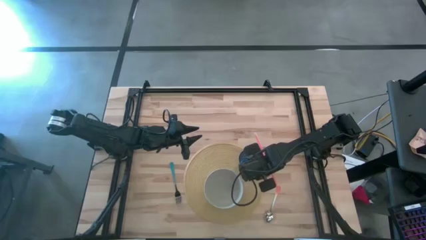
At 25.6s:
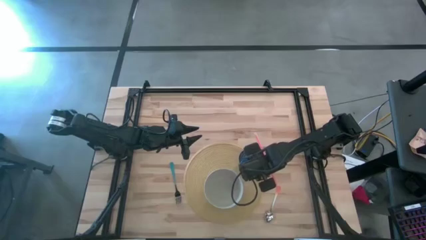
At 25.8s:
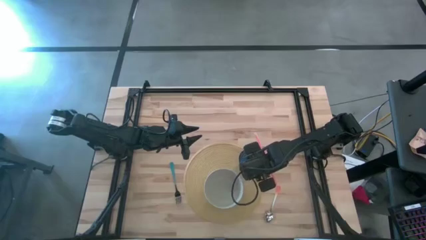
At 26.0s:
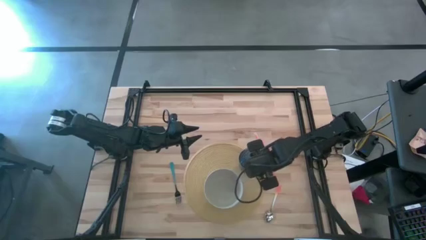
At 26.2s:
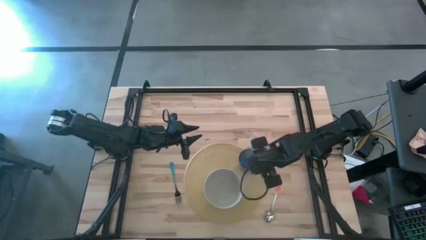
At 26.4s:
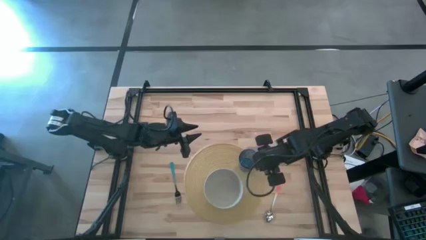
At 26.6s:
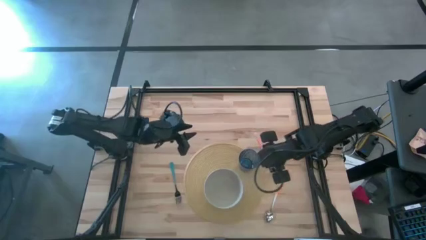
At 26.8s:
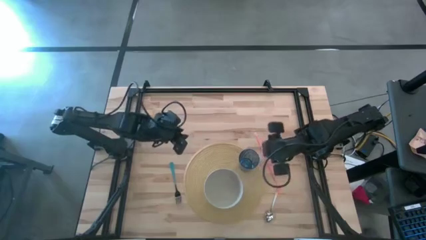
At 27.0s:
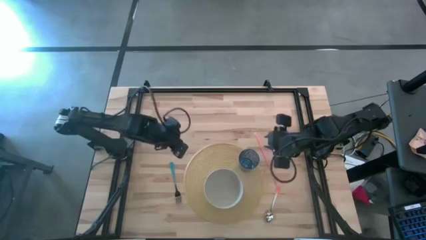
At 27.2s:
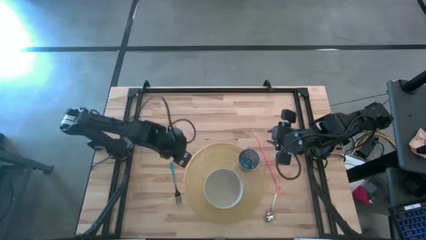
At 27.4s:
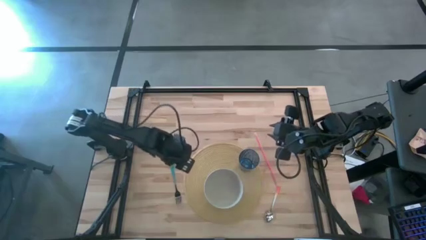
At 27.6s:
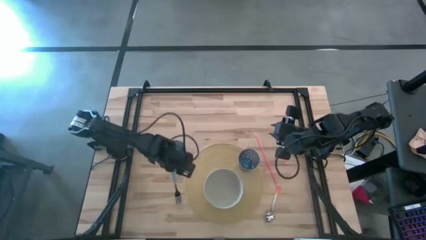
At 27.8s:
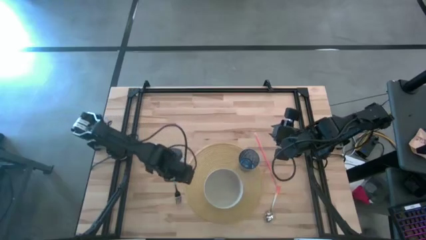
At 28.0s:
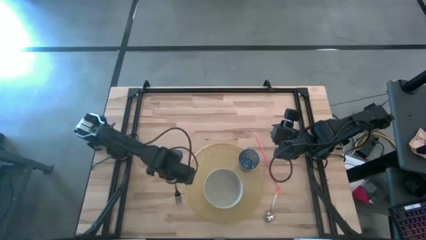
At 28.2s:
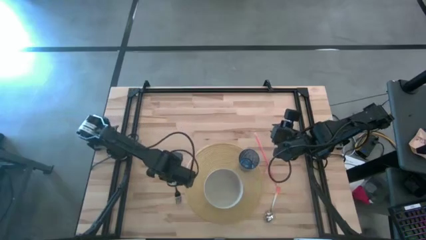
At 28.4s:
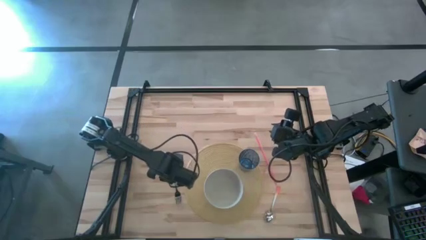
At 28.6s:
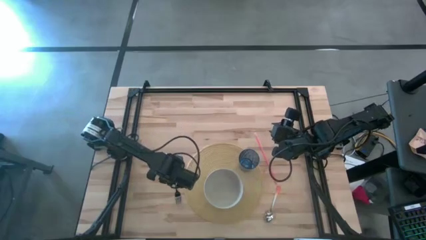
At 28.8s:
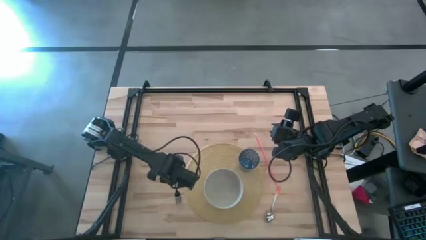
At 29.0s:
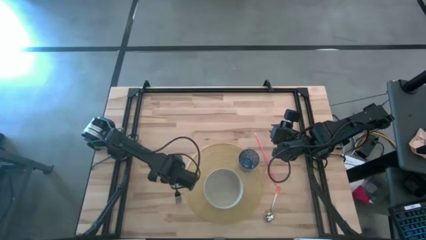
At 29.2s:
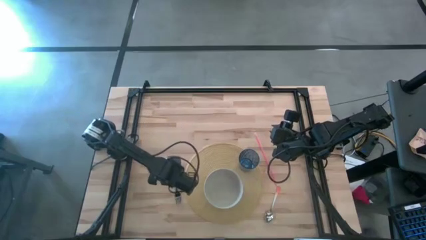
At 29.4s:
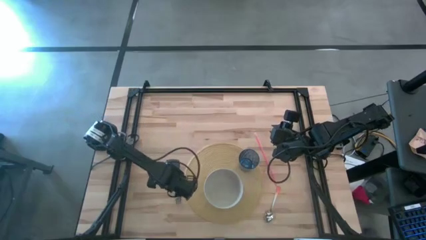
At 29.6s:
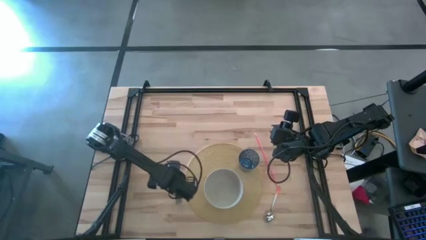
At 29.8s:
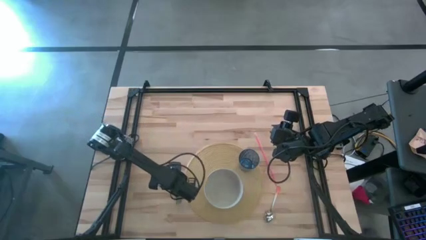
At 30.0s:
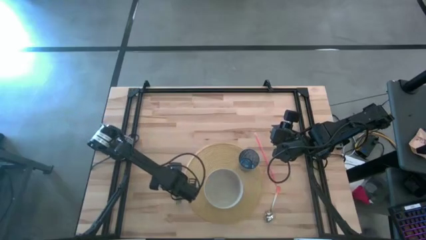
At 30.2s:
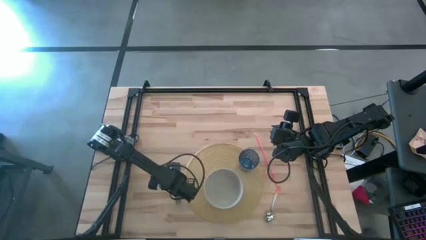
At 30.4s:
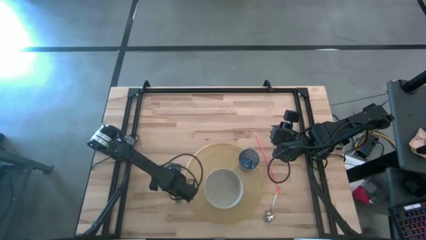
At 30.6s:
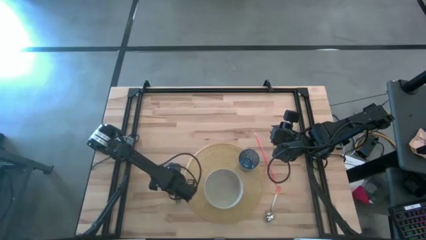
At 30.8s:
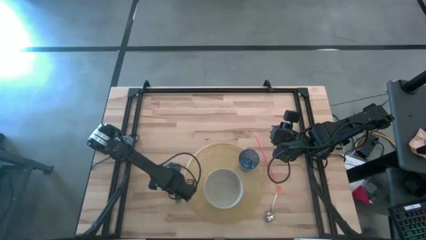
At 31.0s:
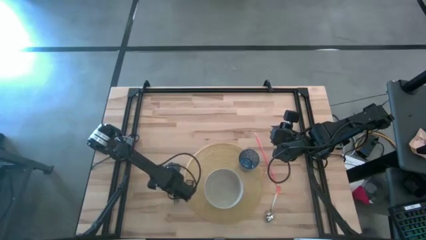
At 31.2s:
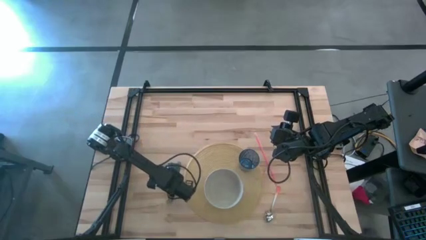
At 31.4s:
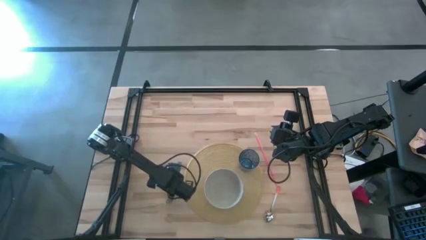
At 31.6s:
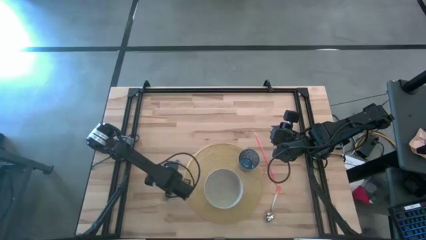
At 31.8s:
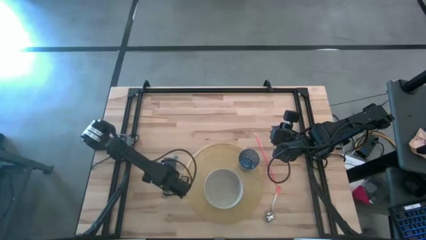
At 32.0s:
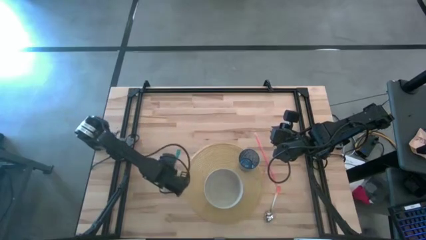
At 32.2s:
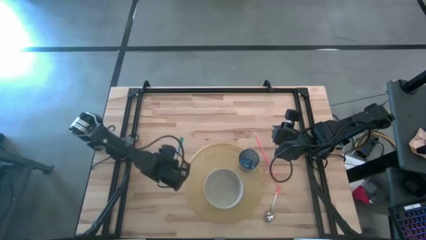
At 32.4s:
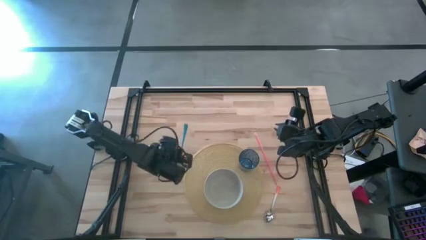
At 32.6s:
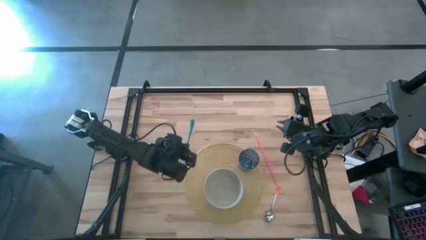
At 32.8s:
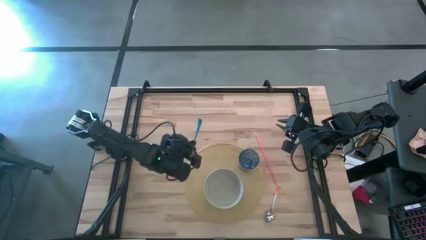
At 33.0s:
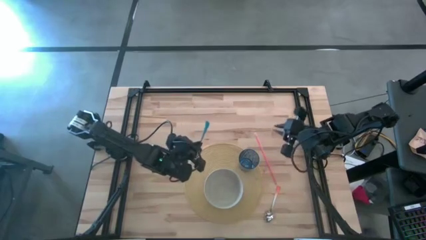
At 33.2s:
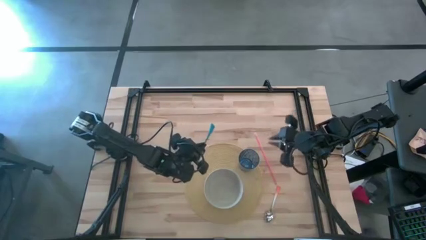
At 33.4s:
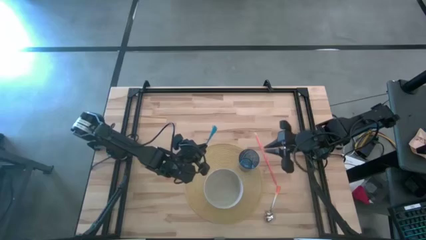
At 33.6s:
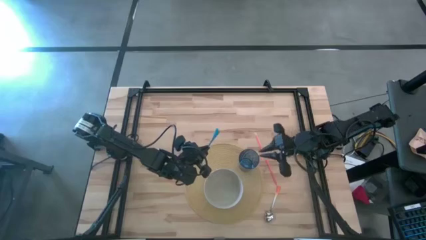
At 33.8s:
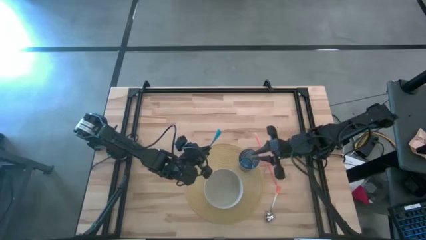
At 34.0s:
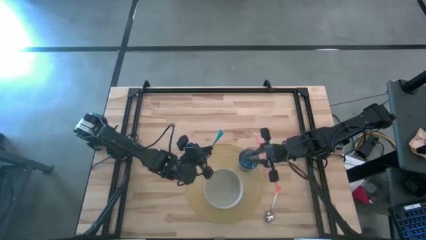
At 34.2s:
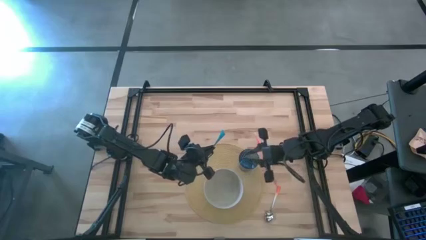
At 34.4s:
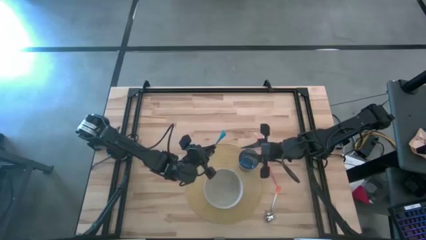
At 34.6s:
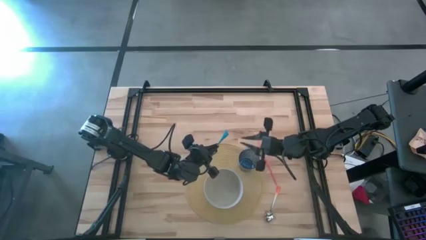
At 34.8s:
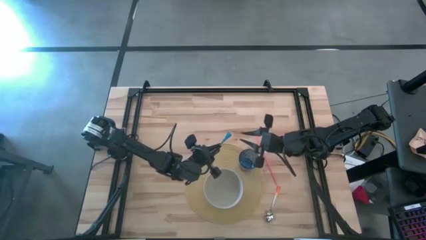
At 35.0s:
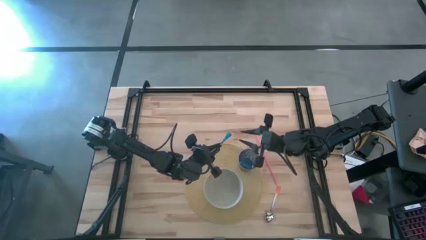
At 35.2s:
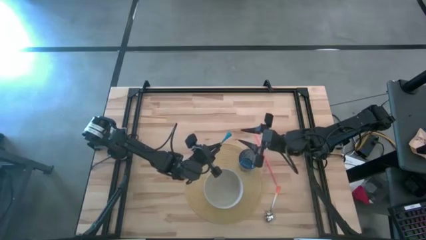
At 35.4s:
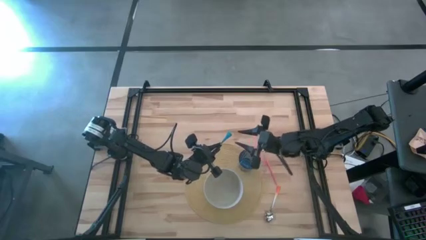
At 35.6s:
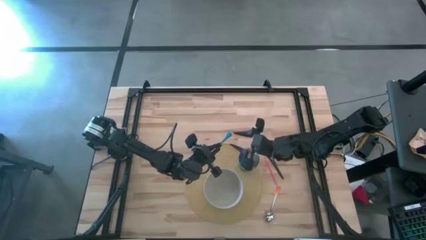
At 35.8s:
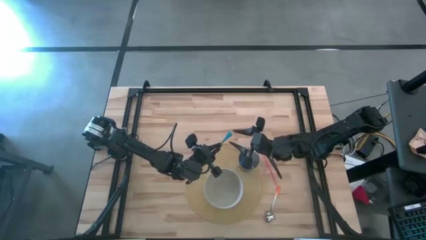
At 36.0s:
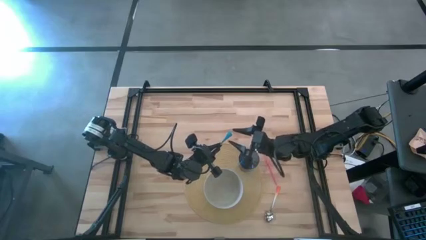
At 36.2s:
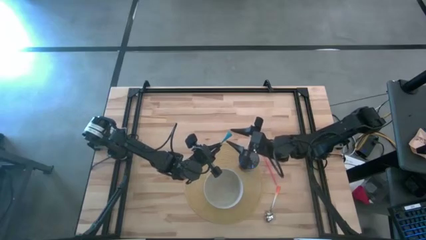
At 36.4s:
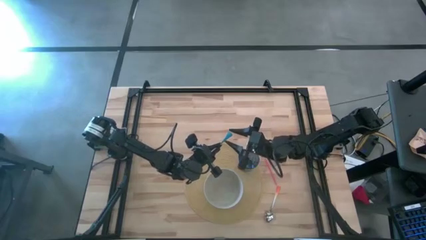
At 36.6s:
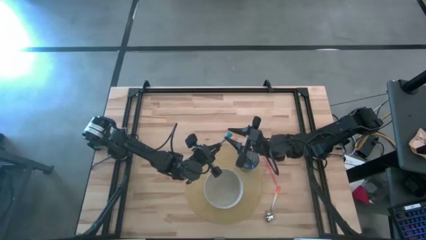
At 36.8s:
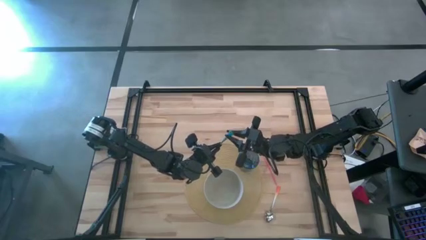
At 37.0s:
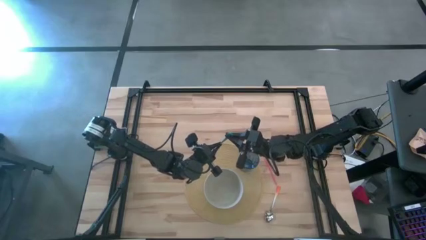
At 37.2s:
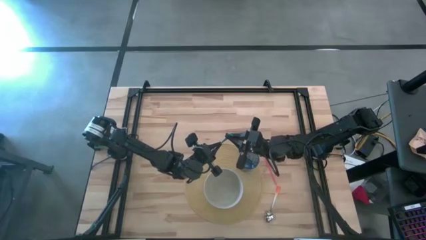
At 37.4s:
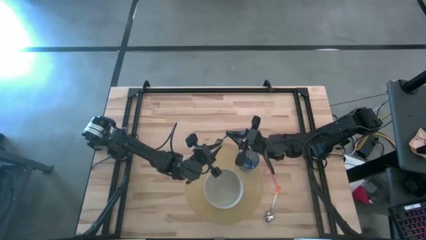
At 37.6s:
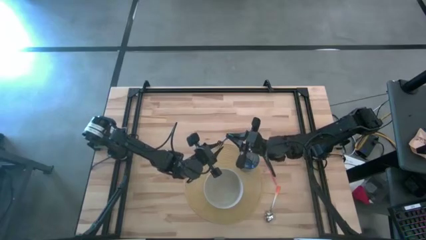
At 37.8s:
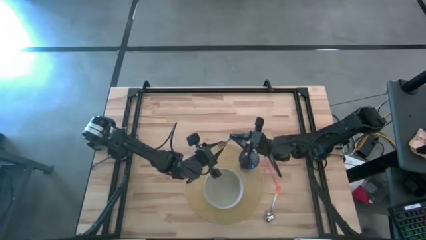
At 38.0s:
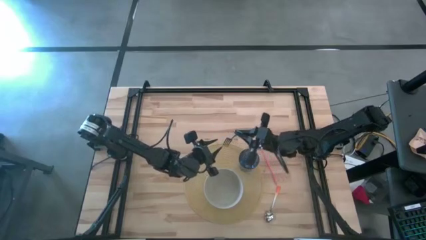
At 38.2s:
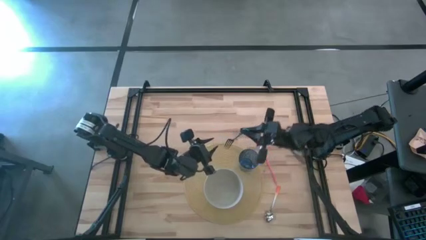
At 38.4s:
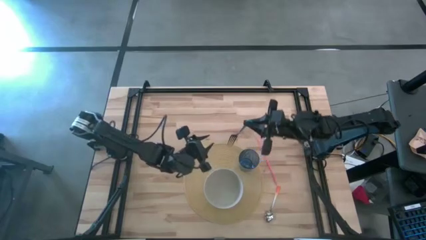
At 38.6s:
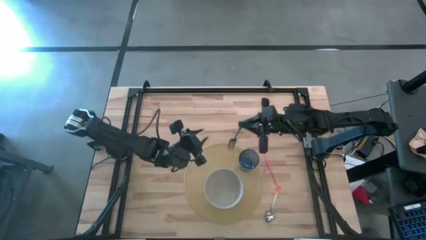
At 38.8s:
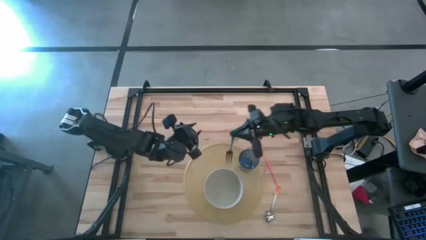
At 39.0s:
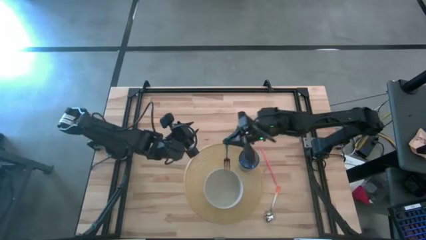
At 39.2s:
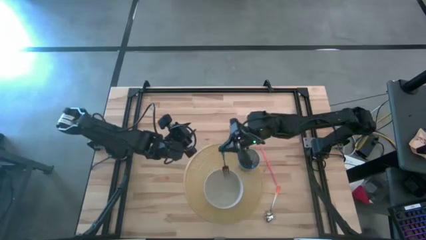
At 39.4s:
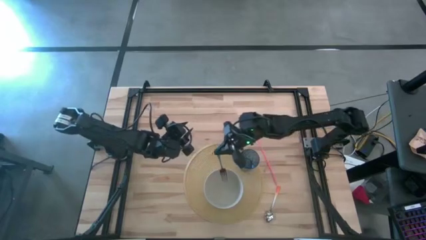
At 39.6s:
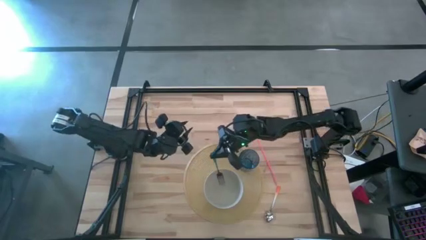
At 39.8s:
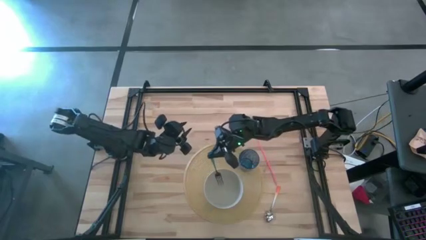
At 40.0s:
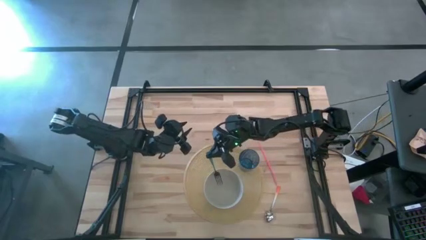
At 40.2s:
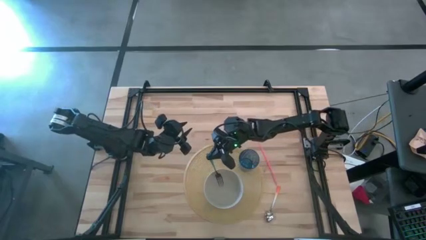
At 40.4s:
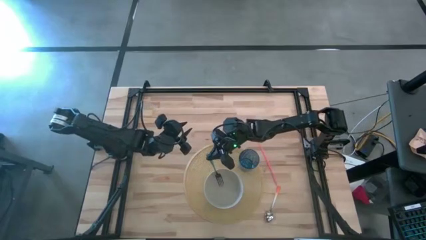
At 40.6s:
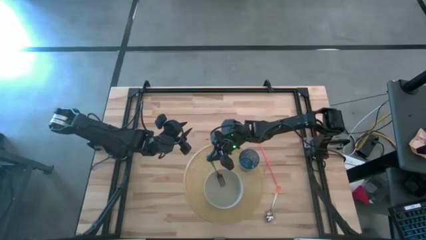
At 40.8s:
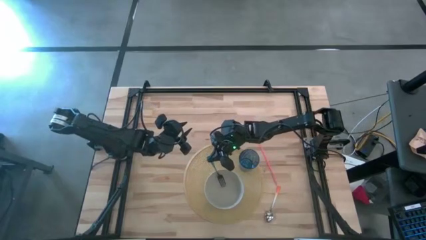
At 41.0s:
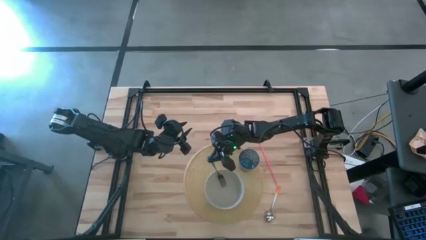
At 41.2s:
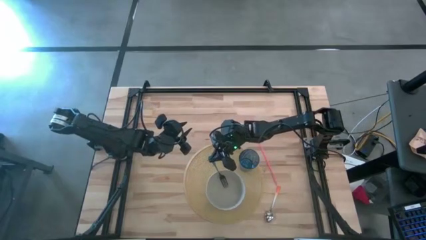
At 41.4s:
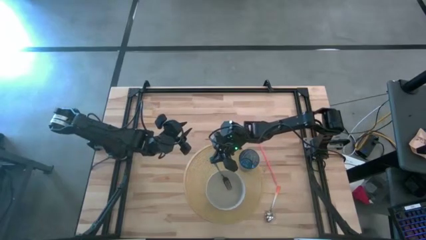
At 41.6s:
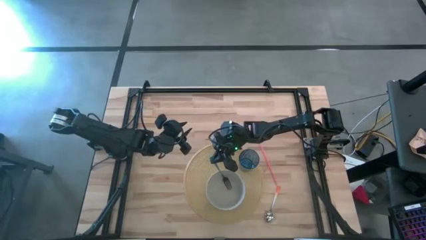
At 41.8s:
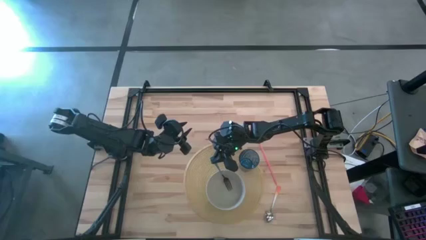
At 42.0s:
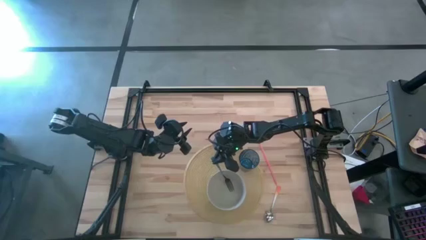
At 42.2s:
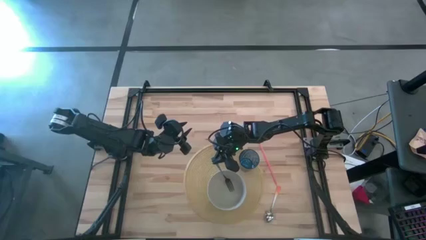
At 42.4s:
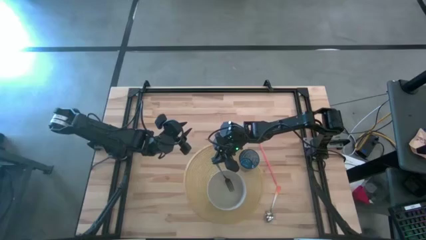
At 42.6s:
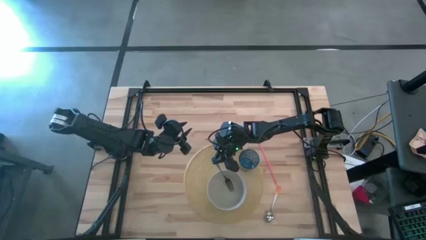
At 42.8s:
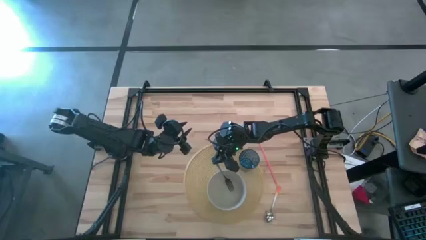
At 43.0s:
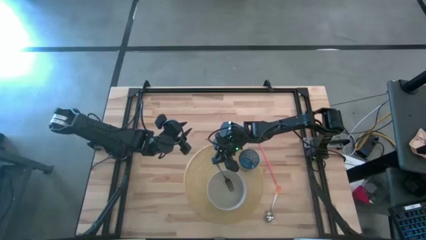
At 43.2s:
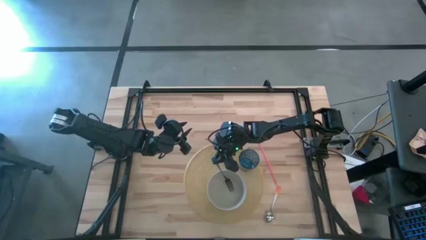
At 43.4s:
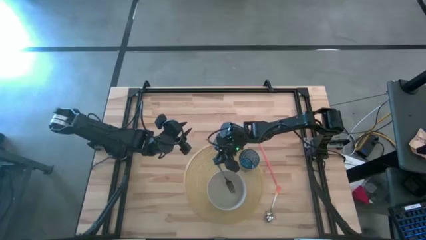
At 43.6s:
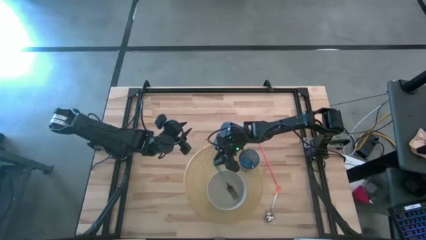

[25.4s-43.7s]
Task: Pick & Place Utensil
Put the blue fork into the white bowl on the brown mat
